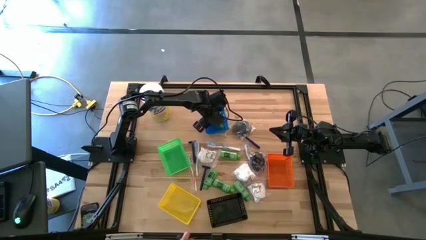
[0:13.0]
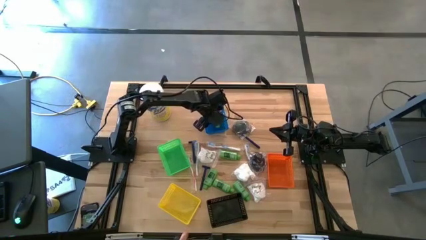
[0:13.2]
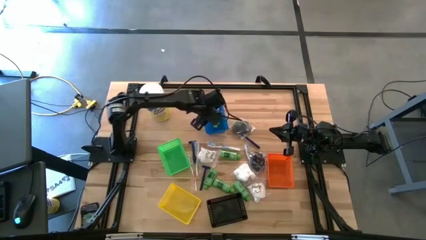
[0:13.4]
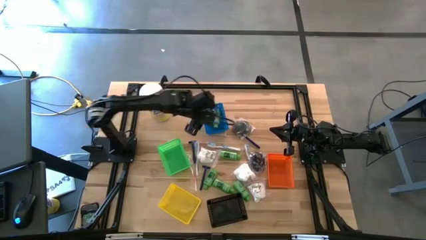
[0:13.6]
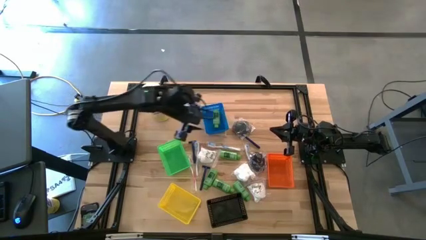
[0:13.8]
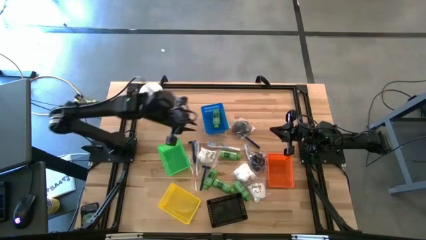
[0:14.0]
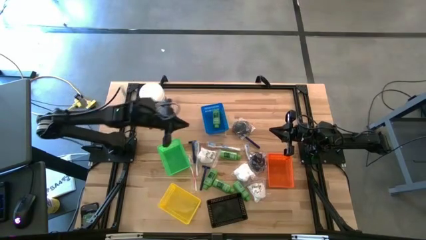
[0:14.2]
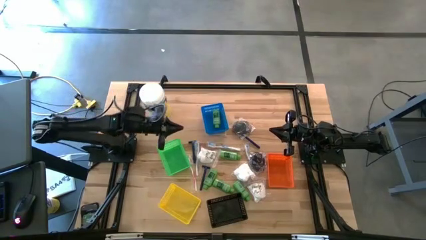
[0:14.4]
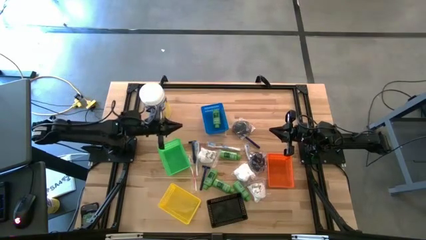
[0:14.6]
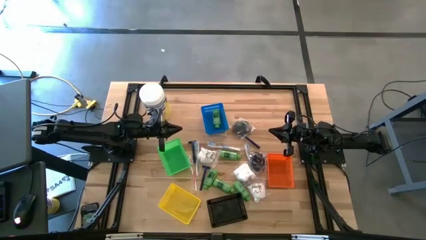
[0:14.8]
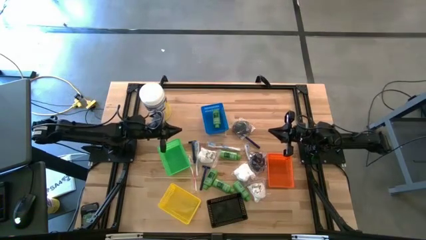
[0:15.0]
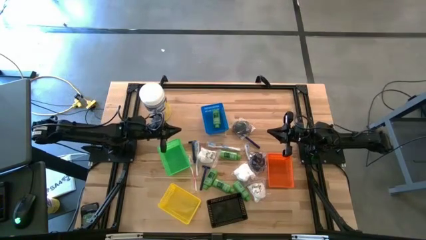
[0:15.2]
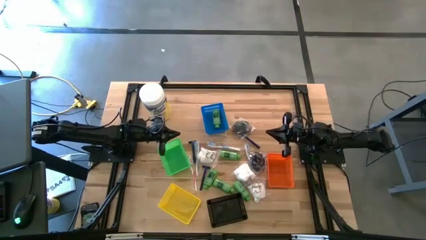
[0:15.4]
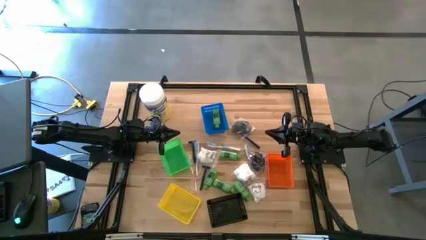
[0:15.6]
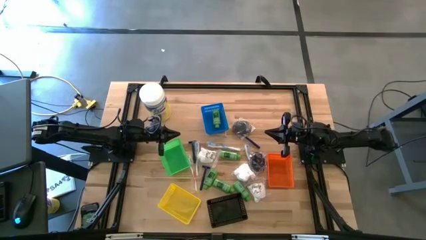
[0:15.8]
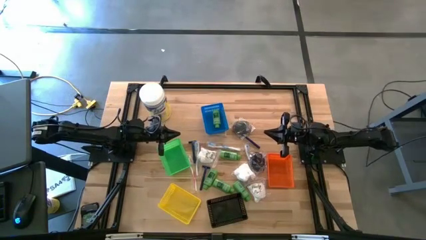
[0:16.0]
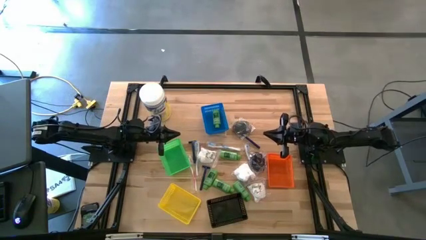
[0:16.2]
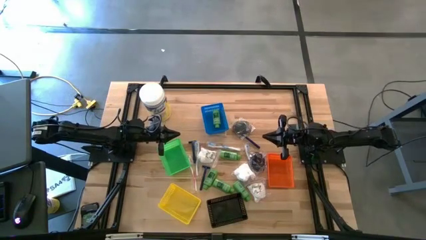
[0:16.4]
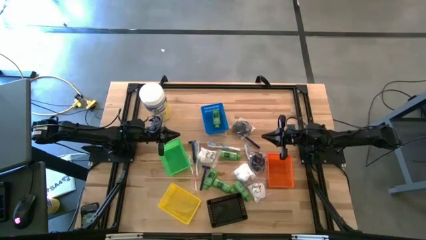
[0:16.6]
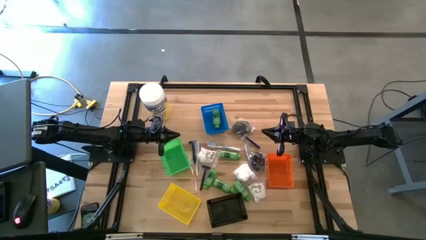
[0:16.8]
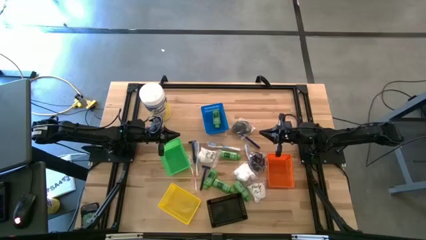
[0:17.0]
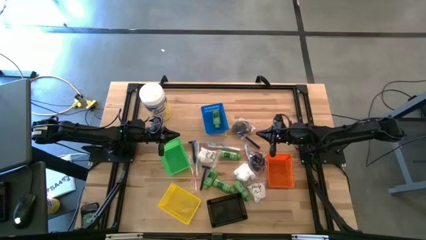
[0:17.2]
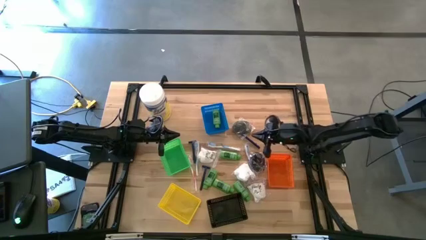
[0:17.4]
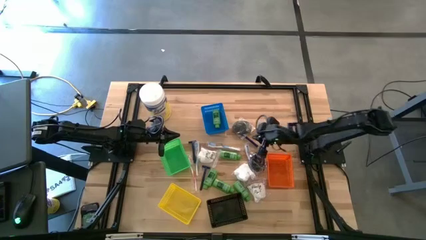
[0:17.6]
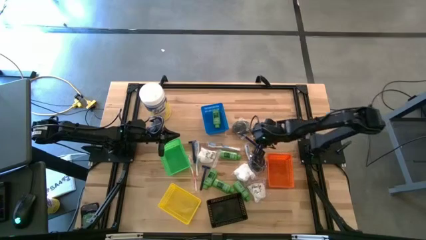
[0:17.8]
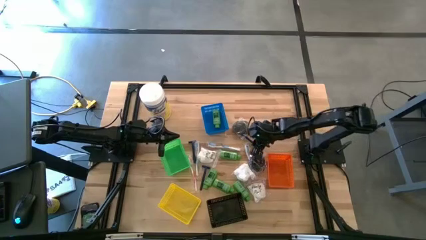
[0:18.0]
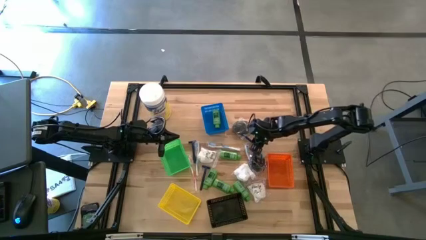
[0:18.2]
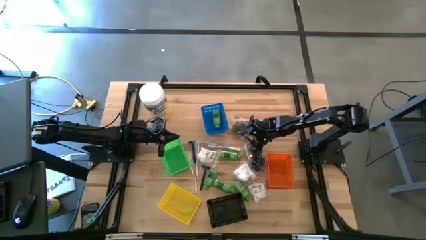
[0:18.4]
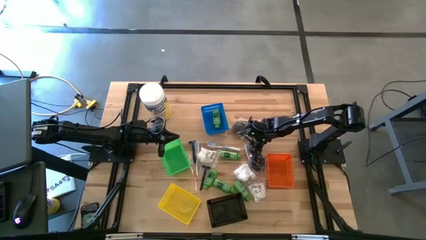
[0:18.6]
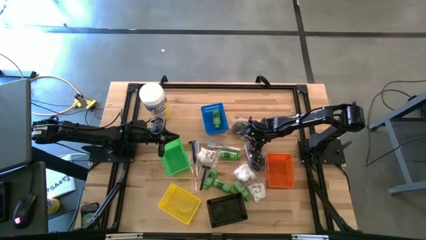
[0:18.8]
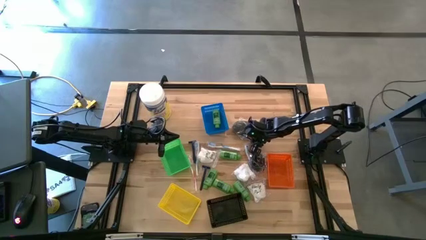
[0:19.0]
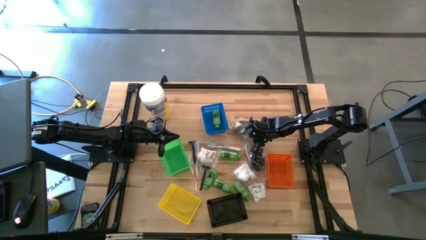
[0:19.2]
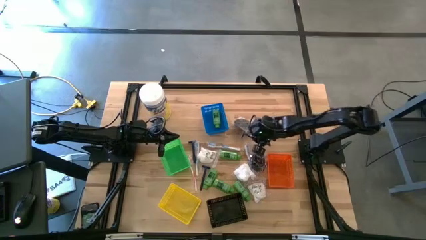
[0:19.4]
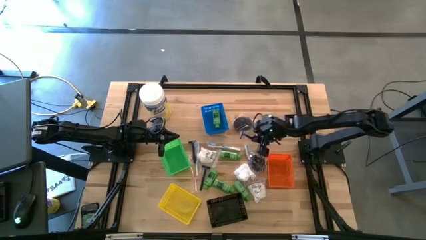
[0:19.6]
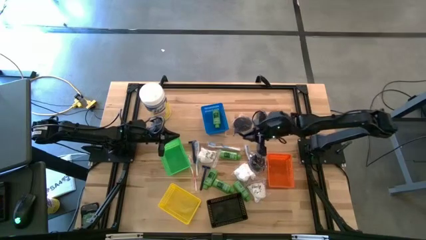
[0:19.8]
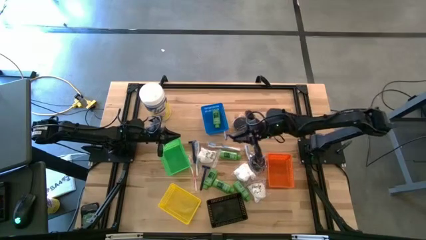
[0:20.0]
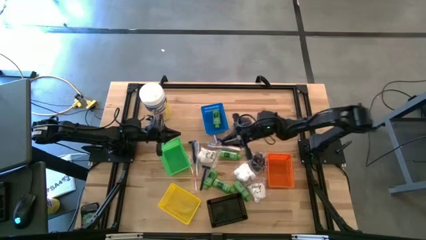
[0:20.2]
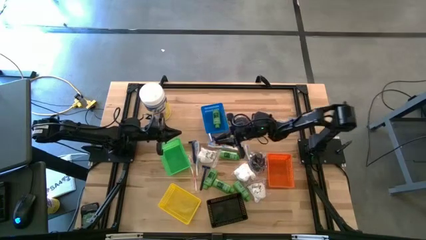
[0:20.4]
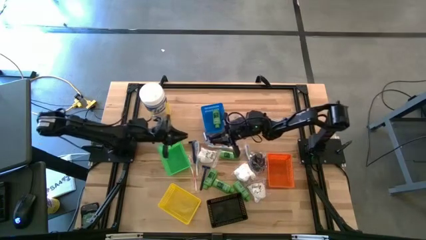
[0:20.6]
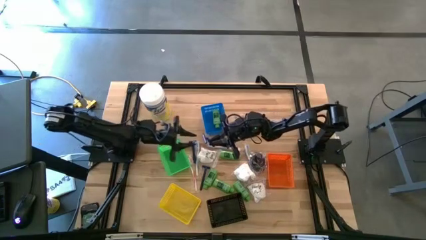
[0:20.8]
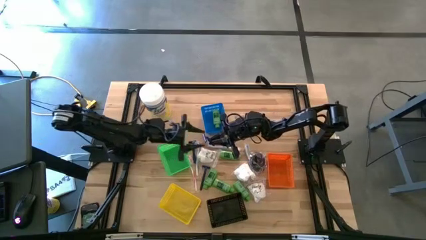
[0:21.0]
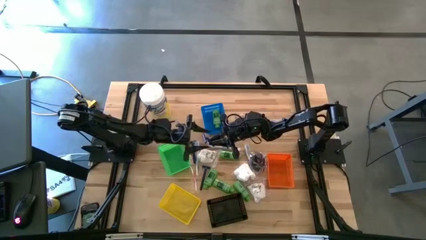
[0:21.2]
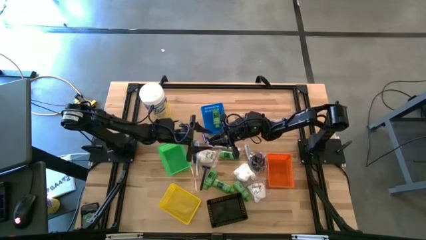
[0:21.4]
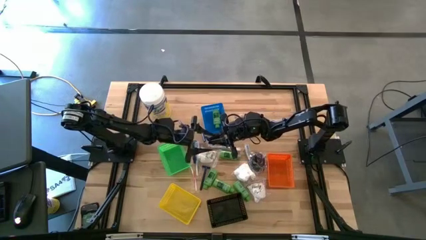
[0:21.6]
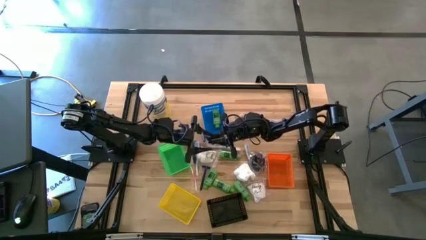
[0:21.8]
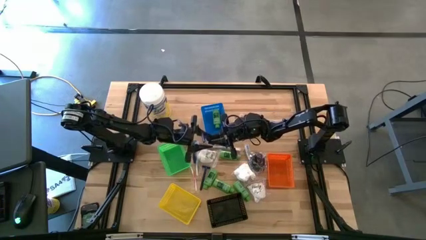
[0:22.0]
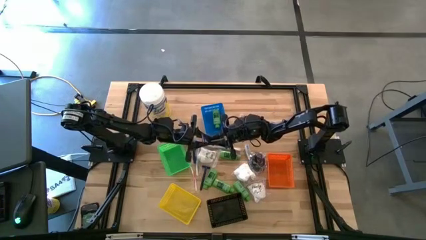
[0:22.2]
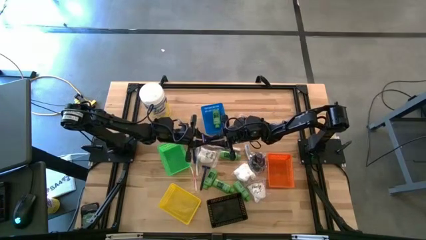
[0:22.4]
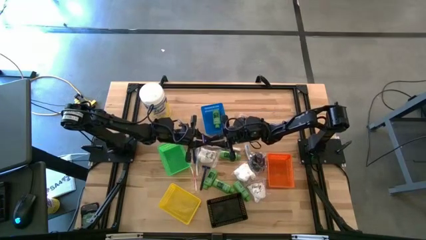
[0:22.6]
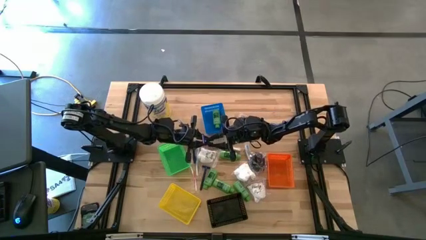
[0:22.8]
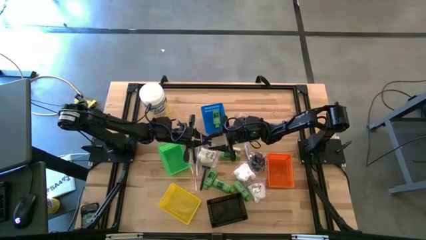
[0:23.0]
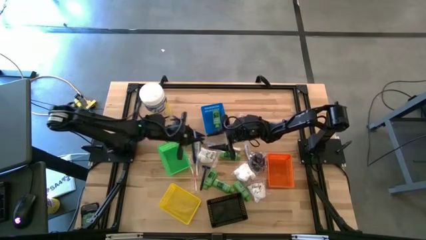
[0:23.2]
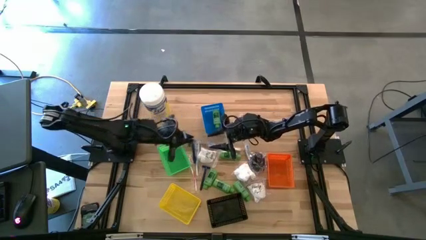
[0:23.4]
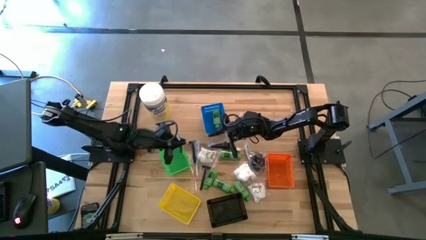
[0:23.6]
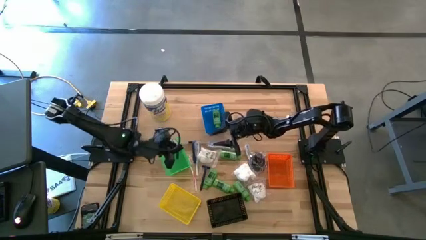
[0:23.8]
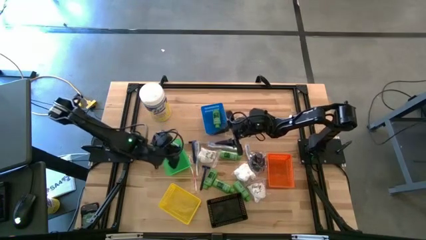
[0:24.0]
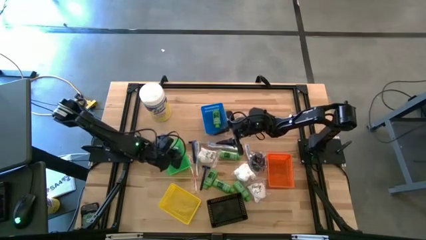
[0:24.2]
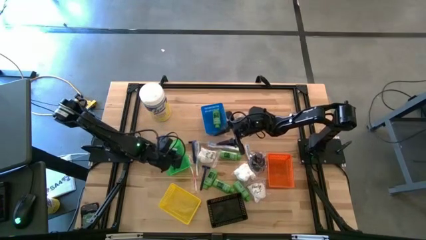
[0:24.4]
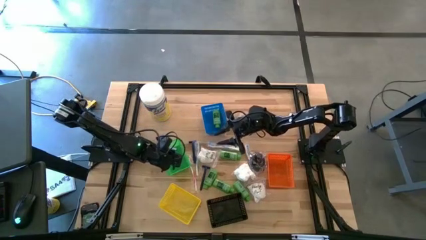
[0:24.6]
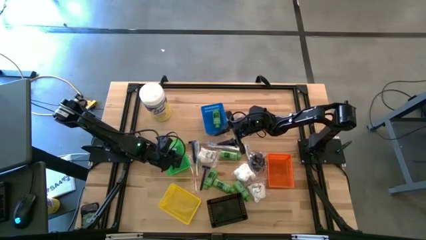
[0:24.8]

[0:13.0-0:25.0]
Task: Pick & Place Travel size toiletries
Put the razor into the green bin

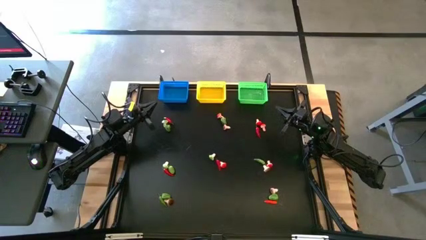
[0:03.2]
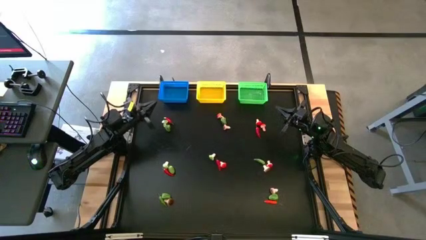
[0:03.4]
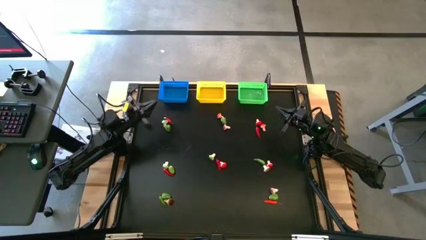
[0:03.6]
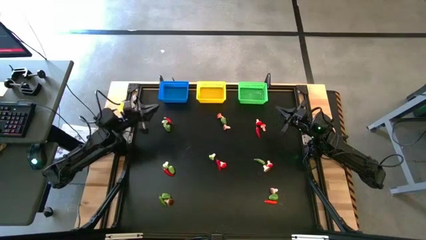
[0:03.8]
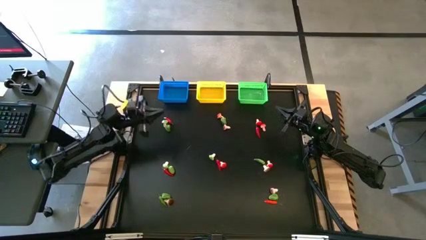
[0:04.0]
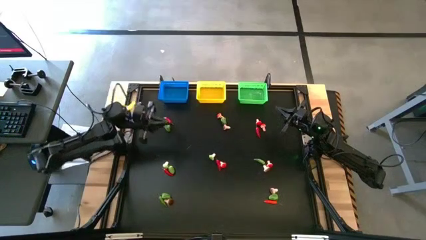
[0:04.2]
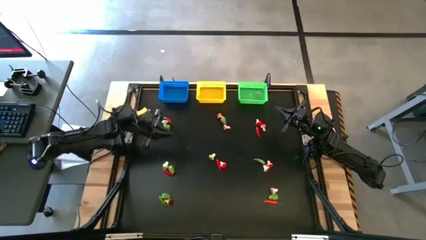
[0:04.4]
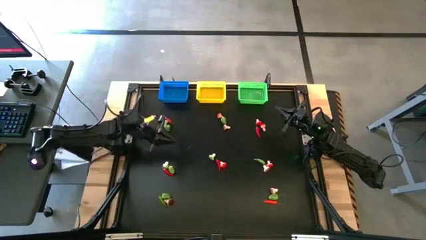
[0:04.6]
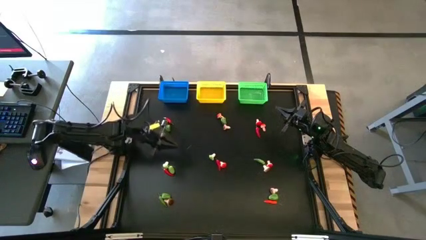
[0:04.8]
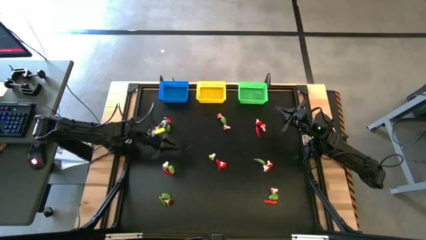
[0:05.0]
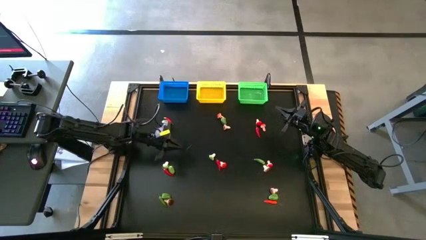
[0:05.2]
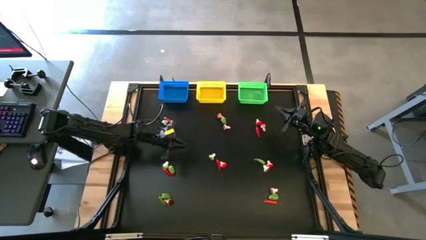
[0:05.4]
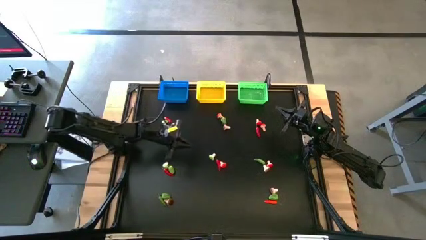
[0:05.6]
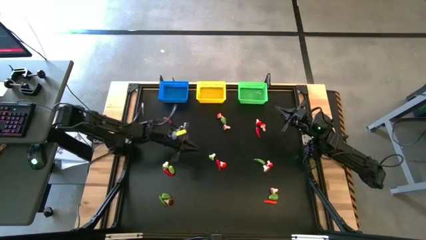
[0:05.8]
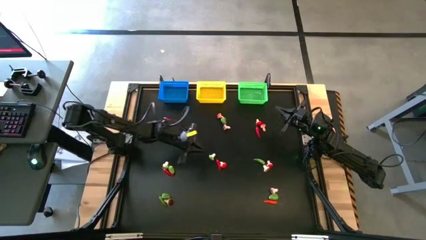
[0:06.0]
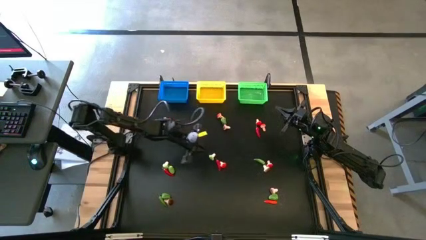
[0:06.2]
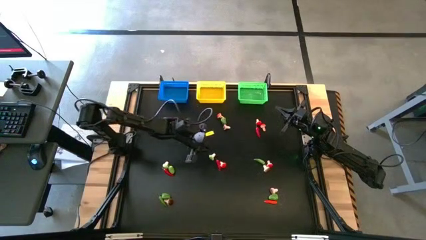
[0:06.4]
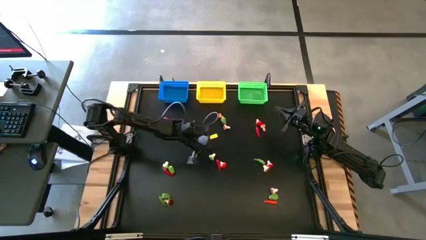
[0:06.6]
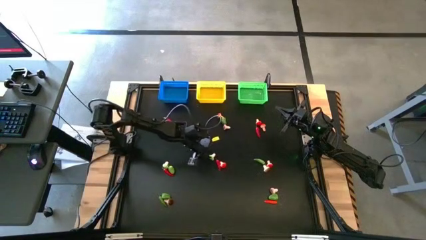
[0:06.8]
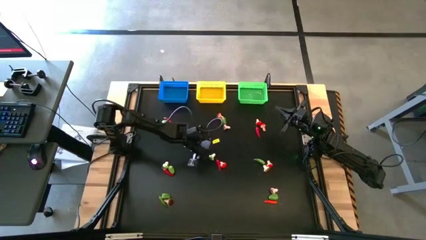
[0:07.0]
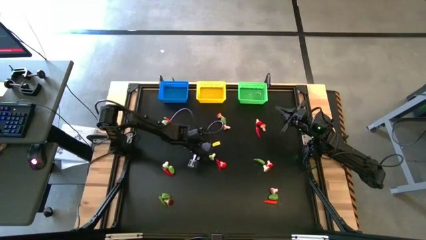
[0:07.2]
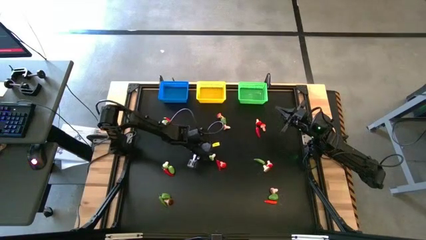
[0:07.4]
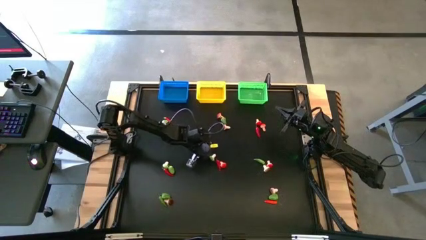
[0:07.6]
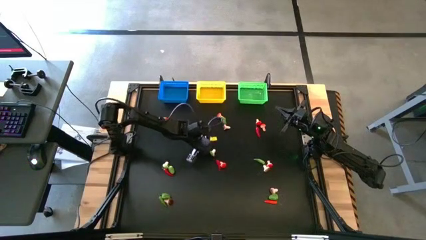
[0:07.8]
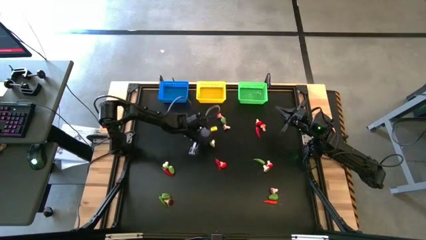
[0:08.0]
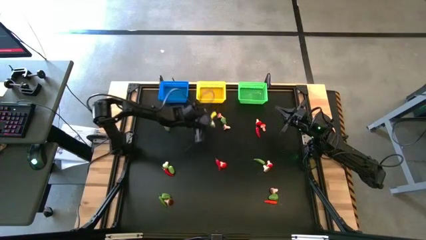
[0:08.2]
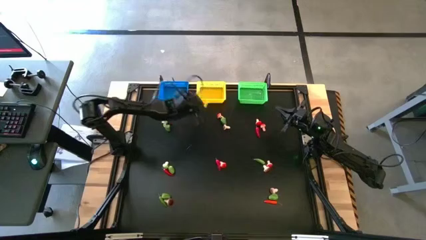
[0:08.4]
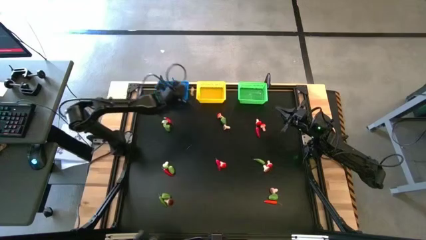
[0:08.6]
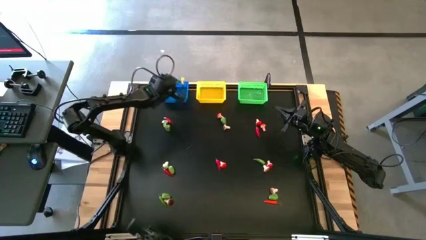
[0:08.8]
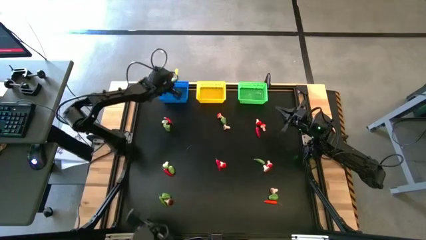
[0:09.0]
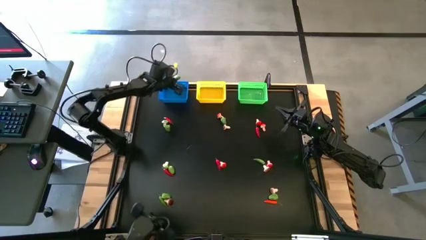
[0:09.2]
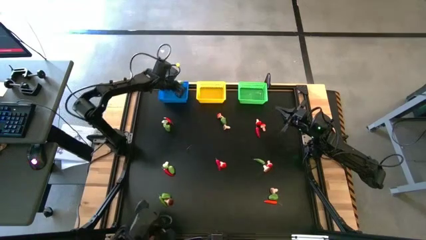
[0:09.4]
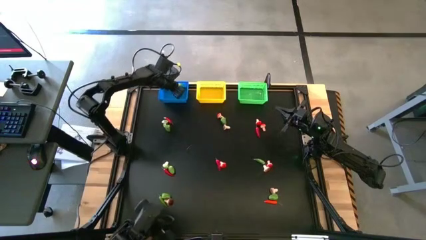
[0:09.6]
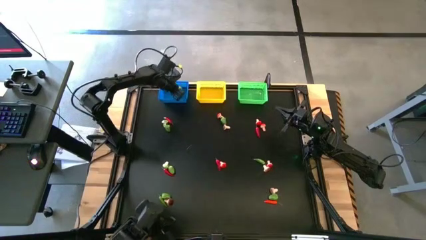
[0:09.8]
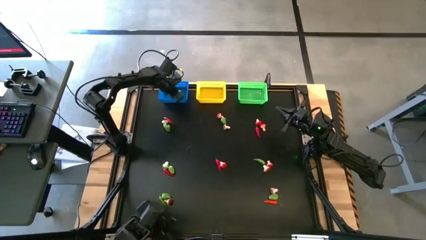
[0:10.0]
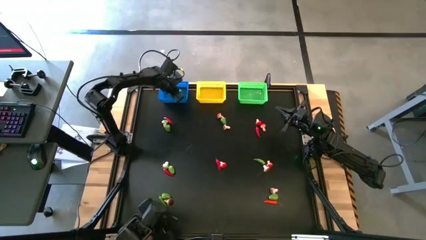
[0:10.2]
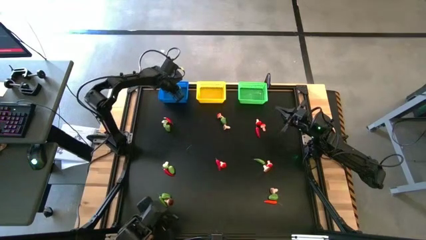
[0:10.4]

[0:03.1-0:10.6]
Task: Sort produce into baskets
Put the green mushroom into the blue bin
